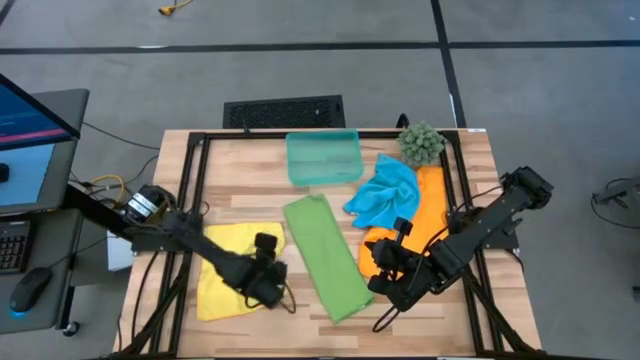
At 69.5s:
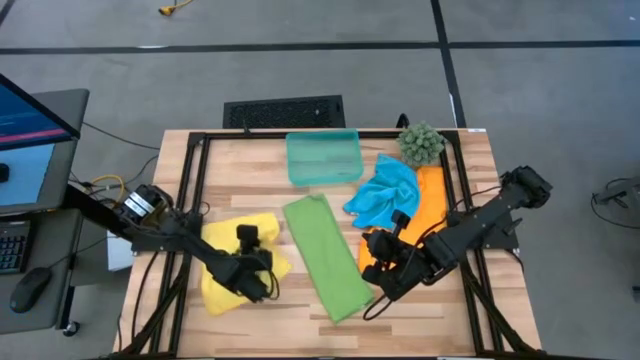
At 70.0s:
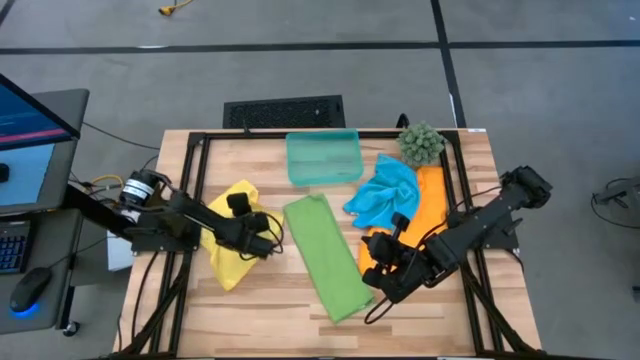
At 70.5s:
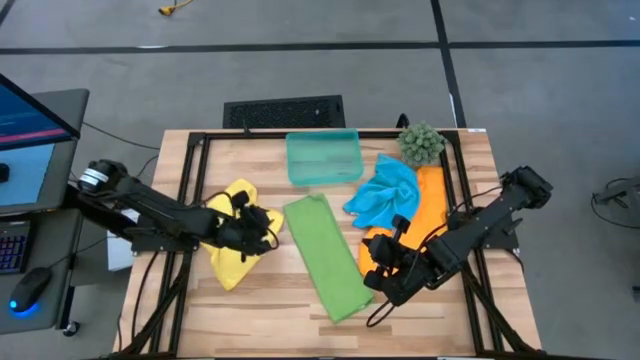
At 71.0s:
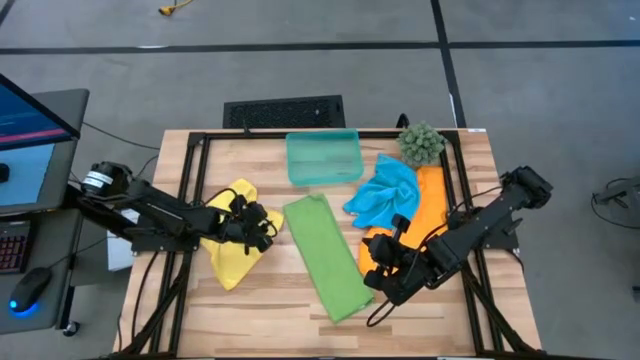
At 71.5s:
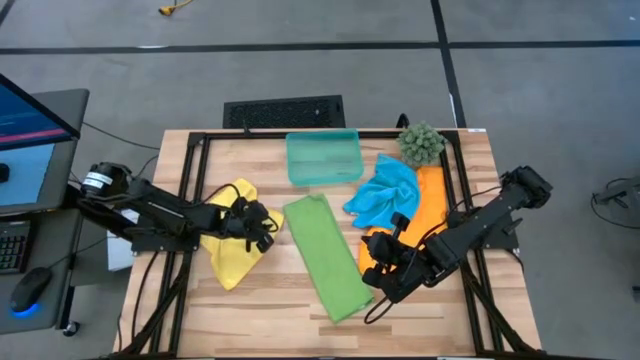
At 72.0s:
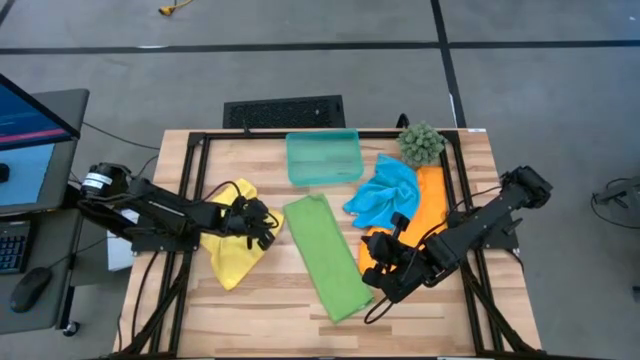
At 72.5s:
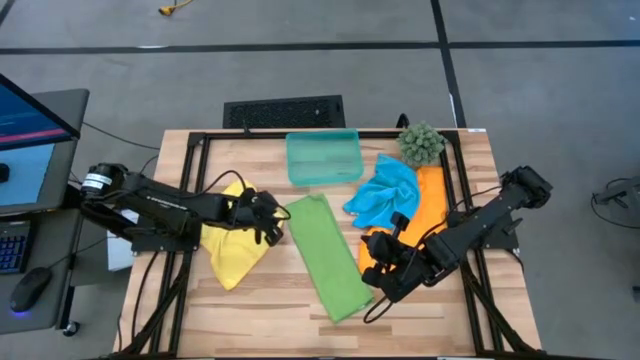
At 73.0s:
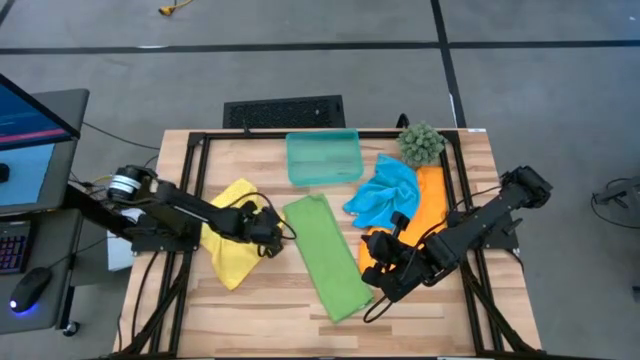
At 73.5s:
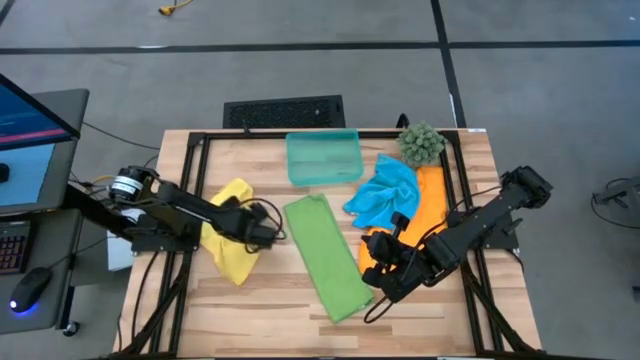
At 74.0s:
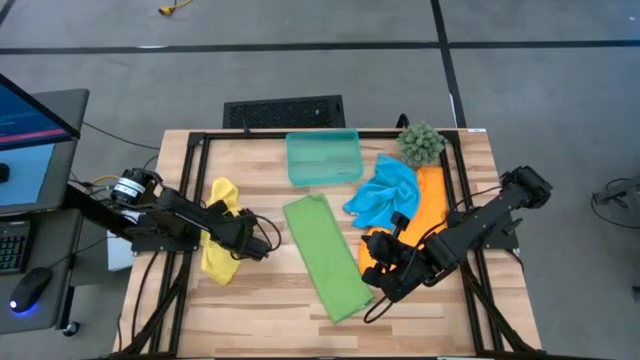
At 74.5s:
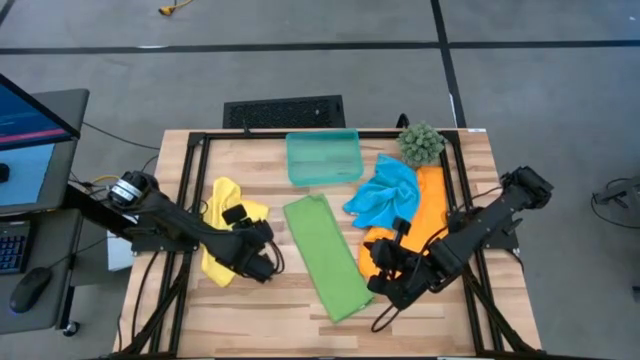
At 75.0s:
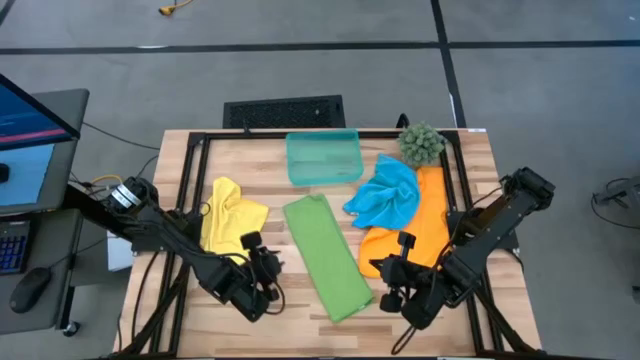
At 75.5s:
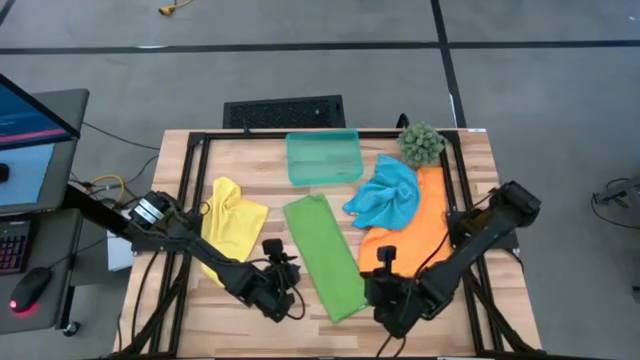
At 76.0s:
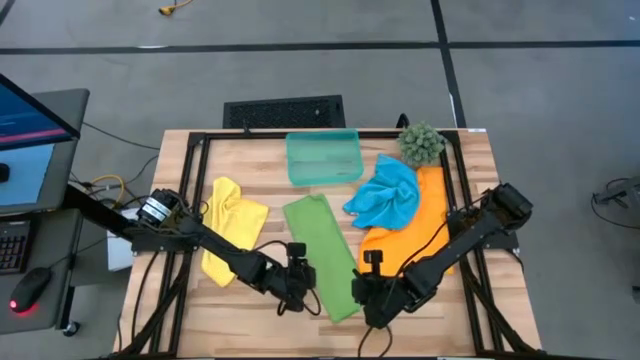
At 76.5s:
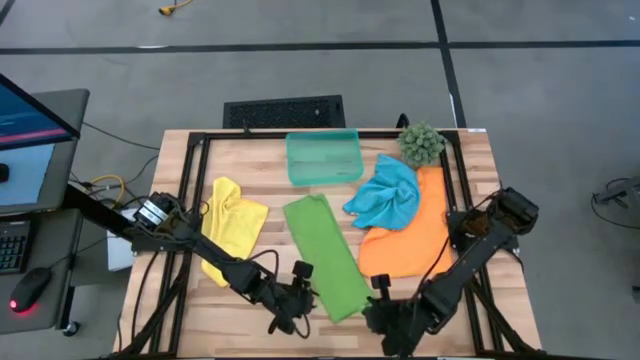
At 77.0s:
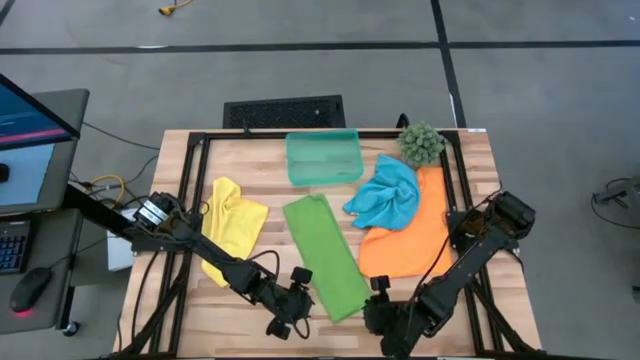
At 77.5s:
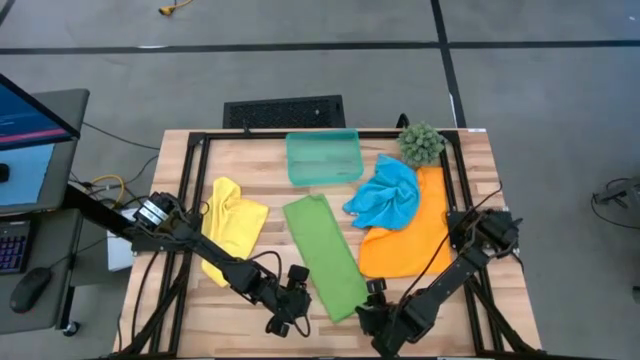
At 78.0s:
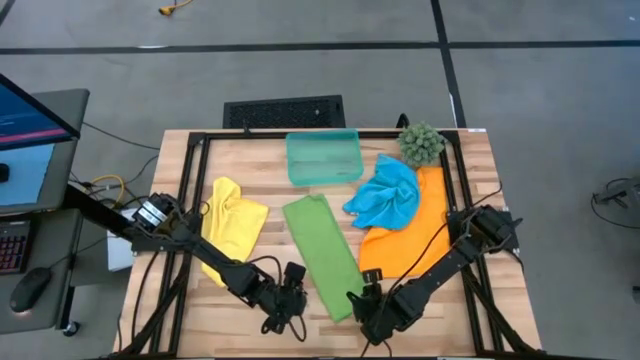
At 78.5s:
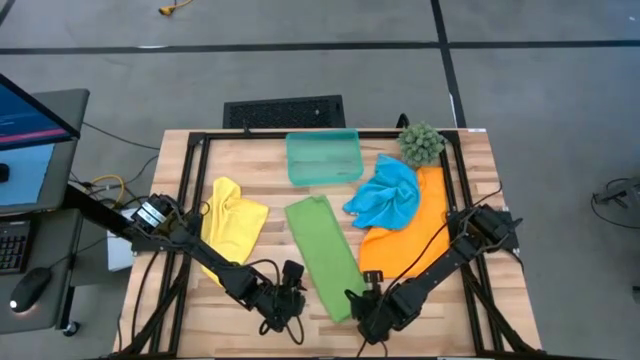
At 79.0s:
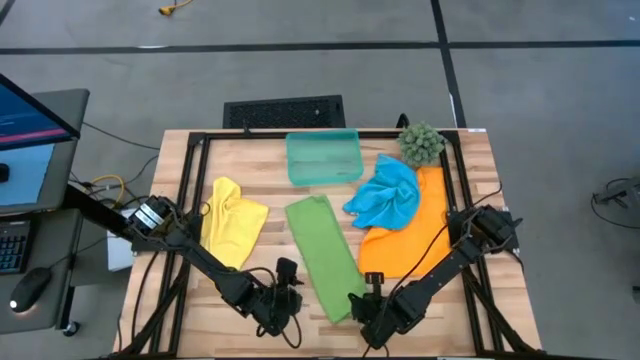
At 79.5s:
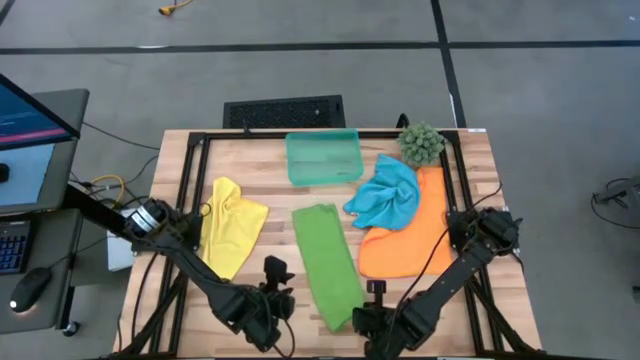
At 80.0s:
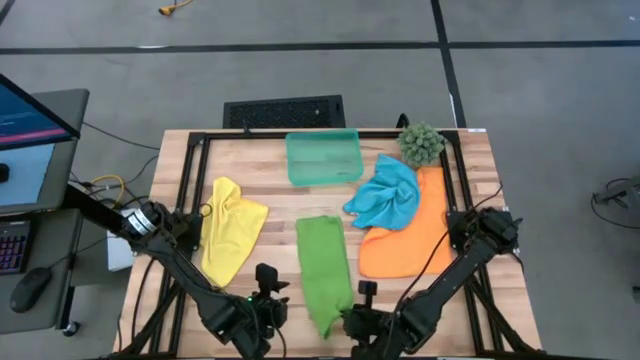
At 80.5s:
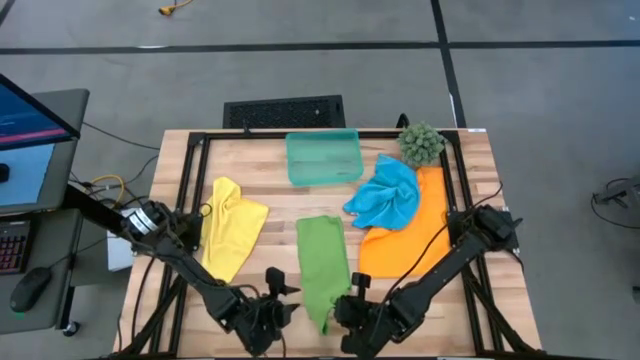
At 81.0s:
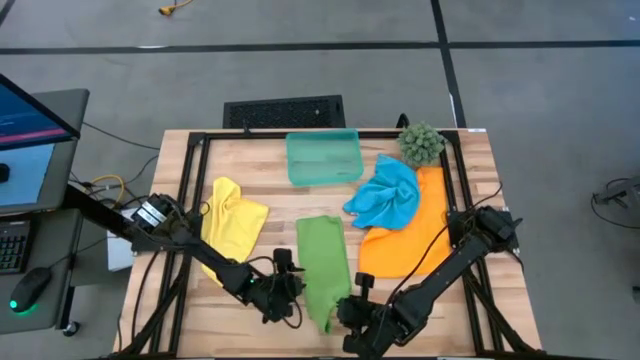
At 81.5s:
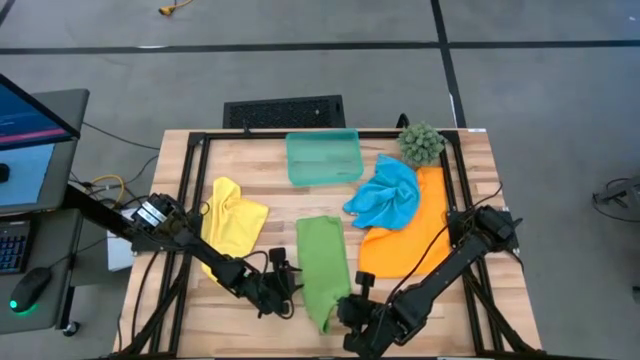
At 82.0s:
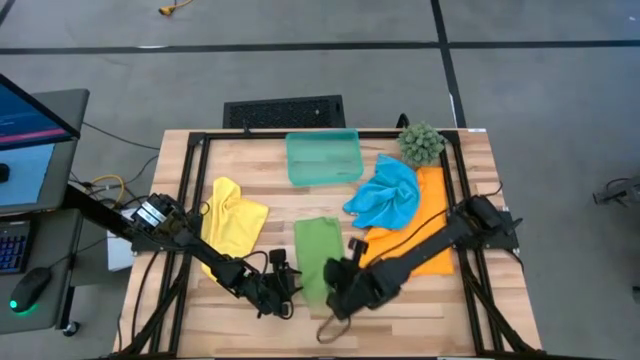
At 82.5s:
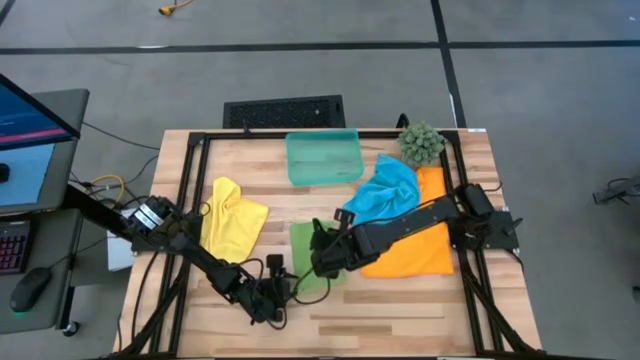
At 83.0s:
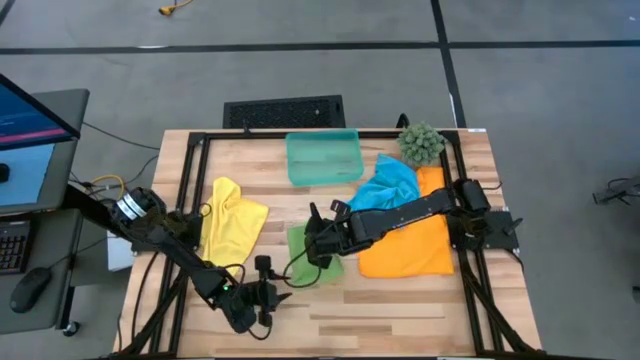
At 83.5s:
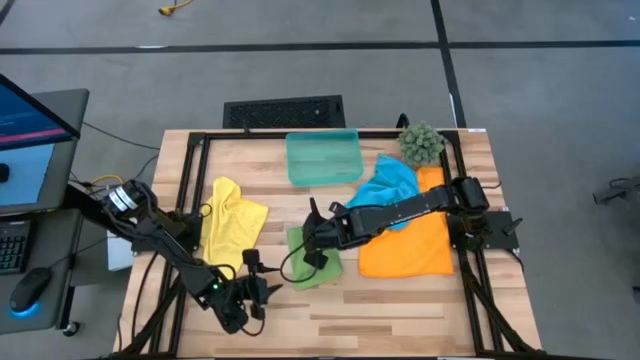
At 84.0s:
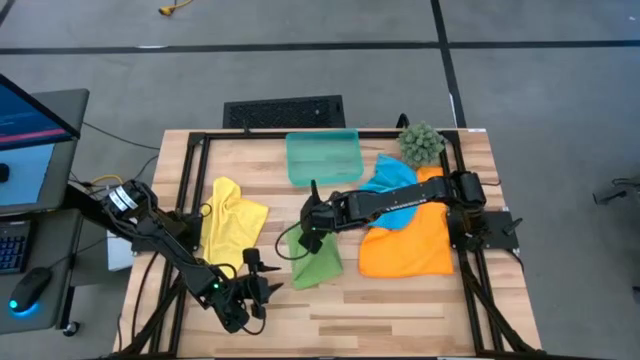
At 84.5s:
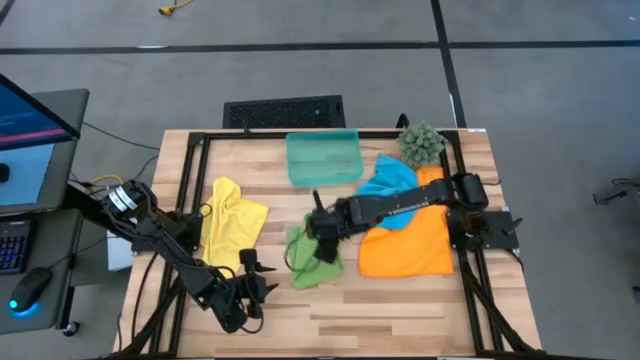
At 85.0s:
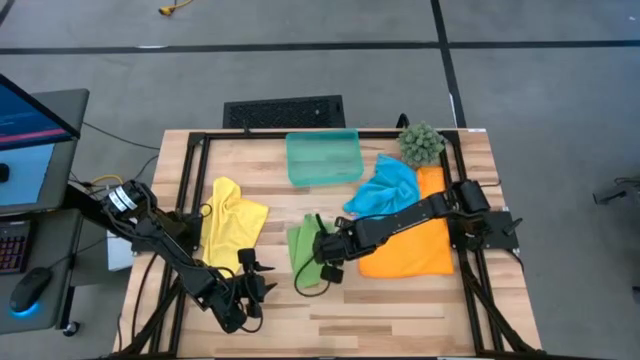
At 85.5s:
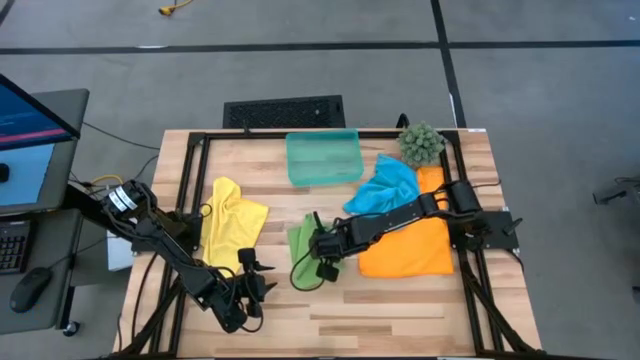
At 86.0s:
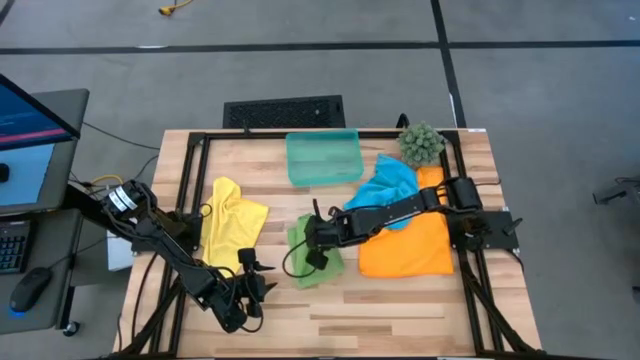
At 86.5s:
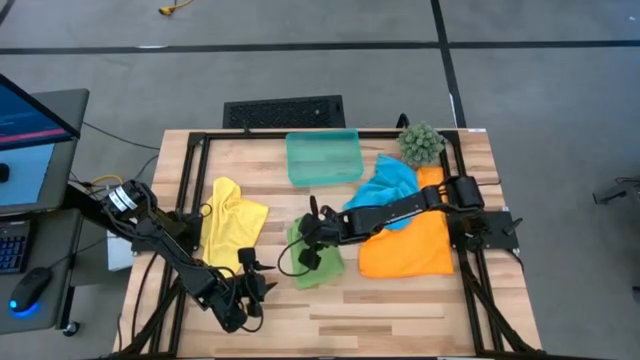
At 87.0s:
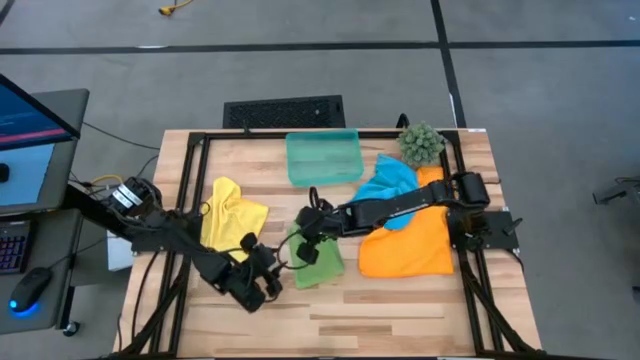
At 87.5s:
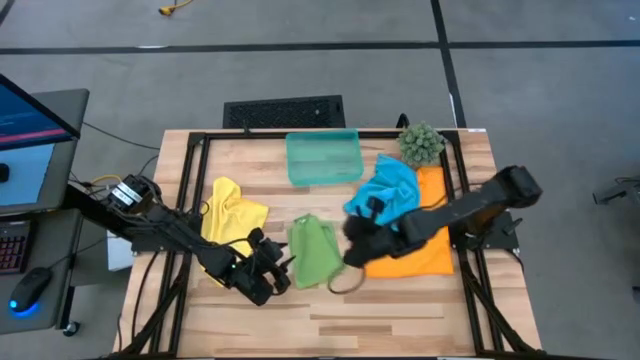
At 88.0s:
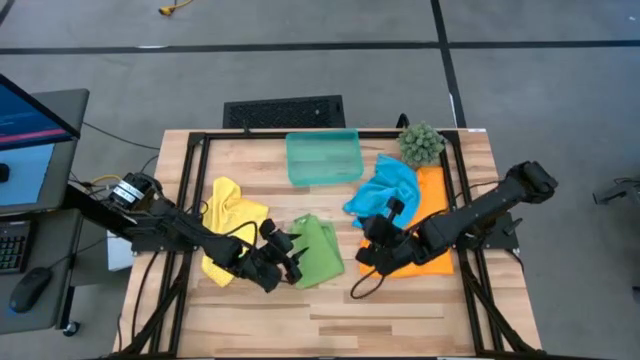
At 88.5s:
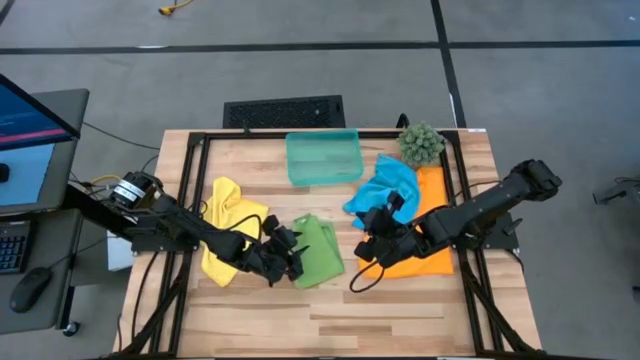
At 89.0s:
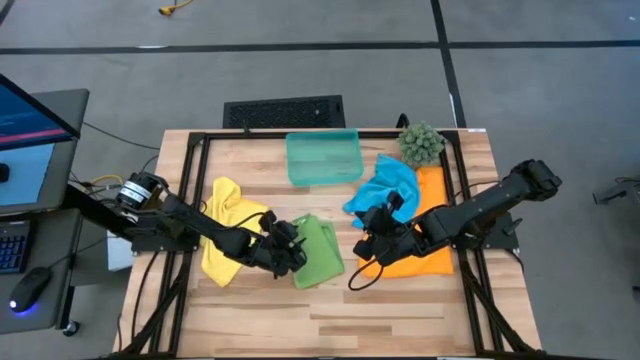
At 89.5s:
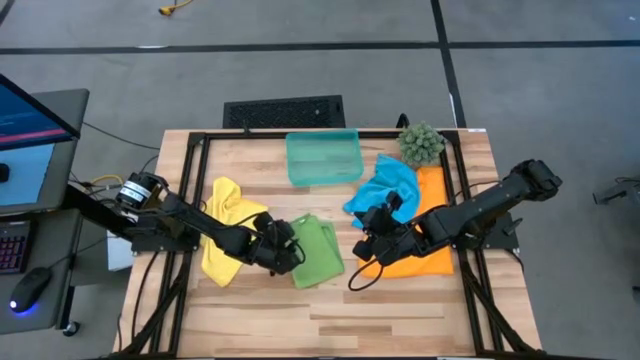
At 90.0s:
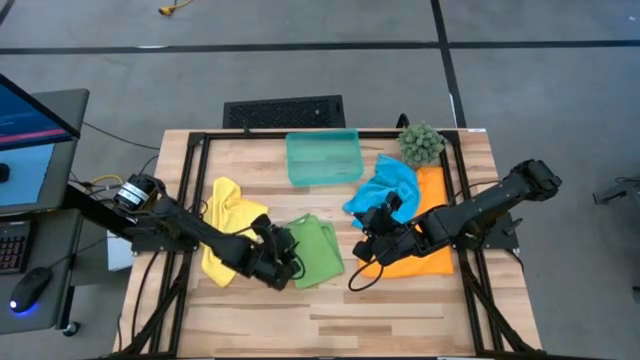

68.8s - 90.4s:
Task: Roll microfiber towels into tight, uniform cylinder then place into a basket
Roll the green microfiber cloth
